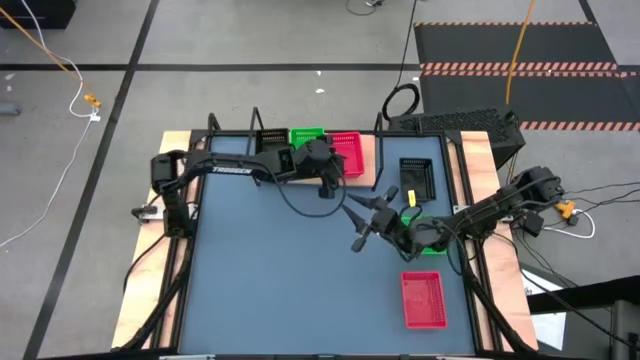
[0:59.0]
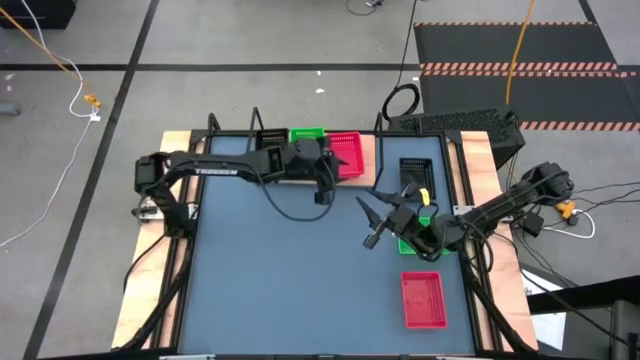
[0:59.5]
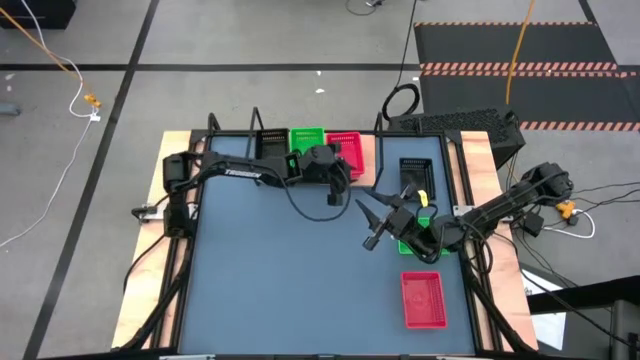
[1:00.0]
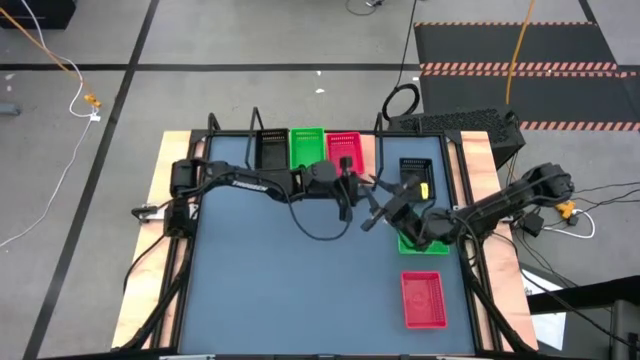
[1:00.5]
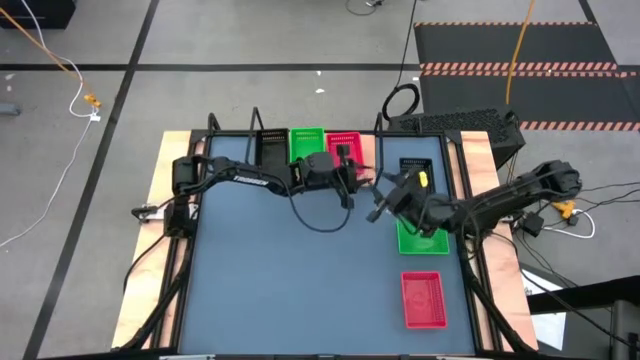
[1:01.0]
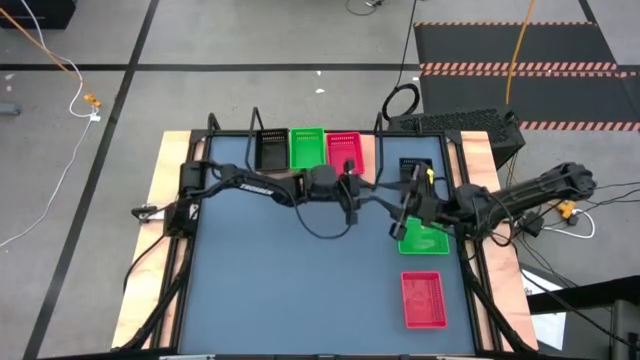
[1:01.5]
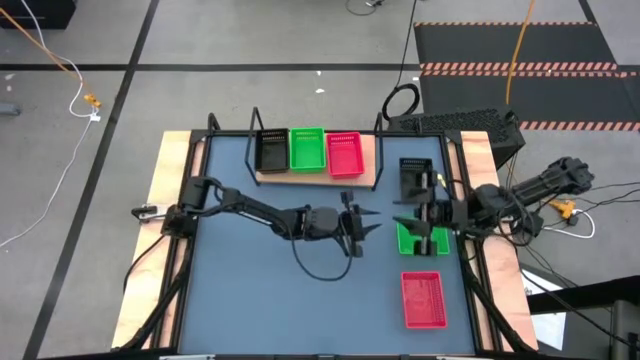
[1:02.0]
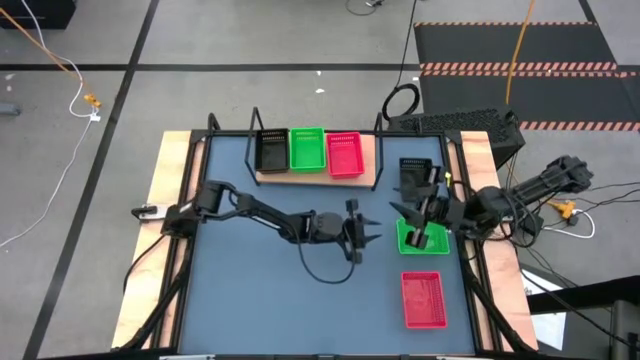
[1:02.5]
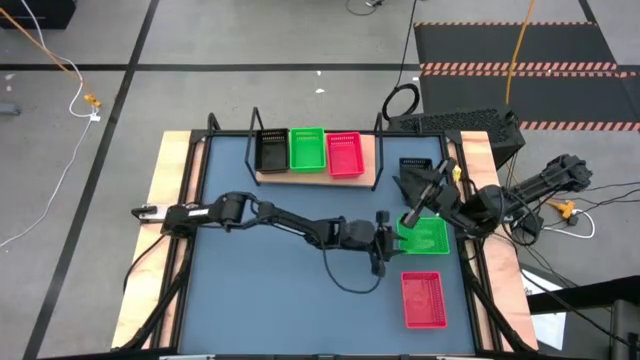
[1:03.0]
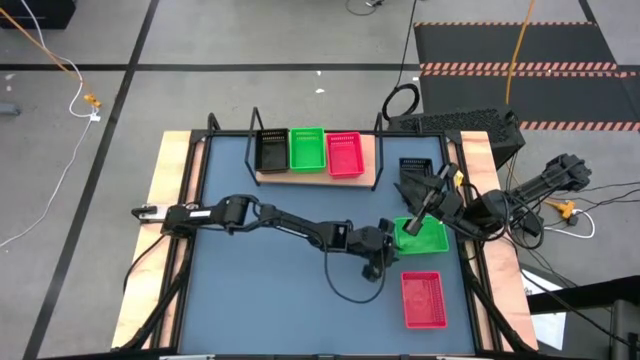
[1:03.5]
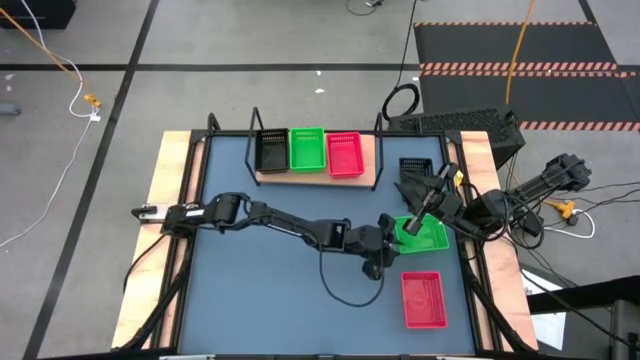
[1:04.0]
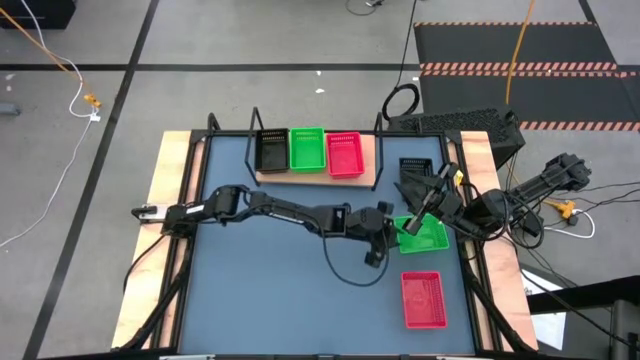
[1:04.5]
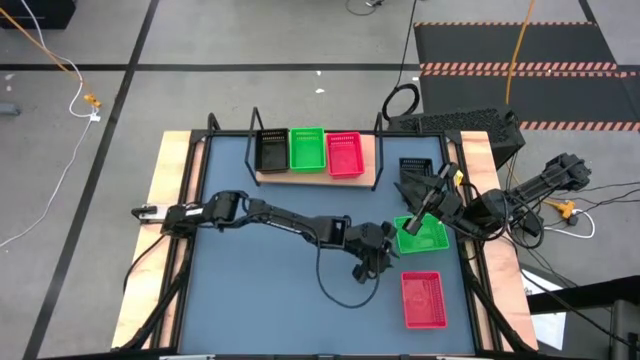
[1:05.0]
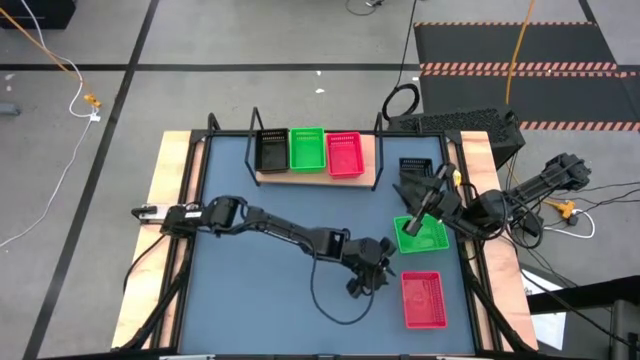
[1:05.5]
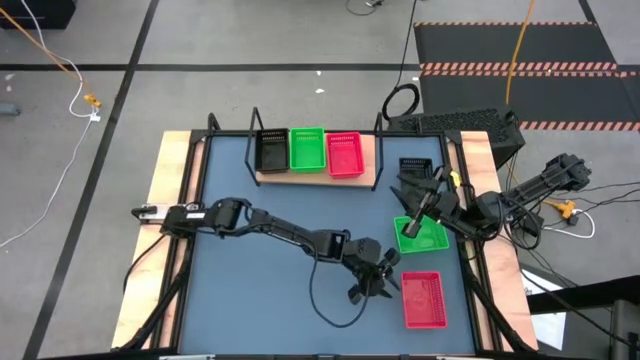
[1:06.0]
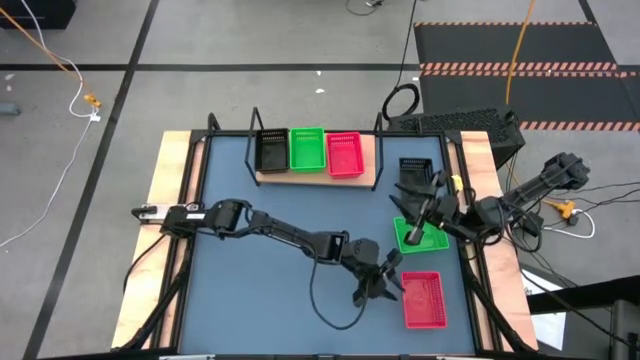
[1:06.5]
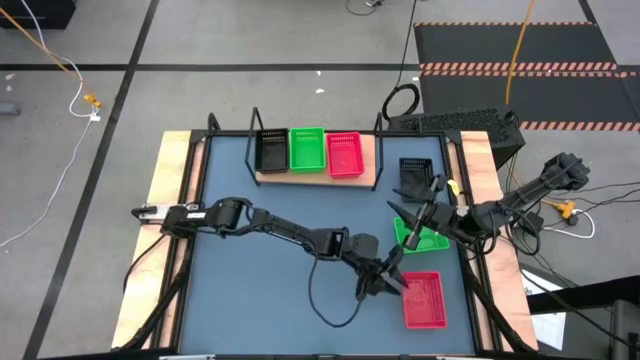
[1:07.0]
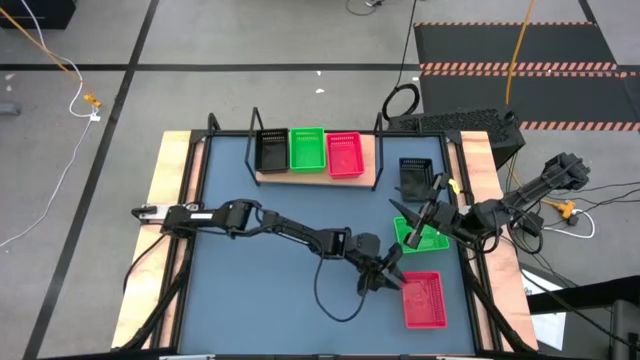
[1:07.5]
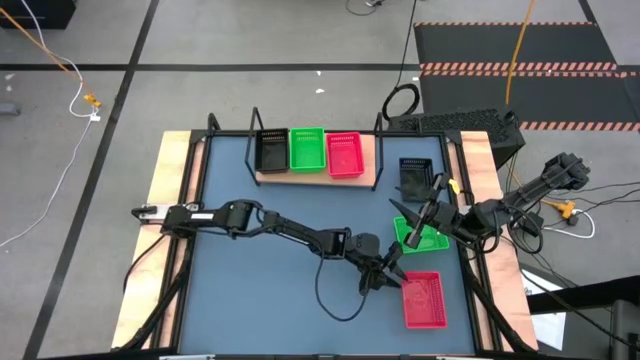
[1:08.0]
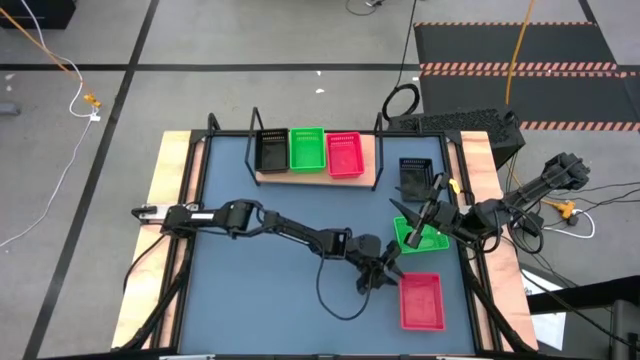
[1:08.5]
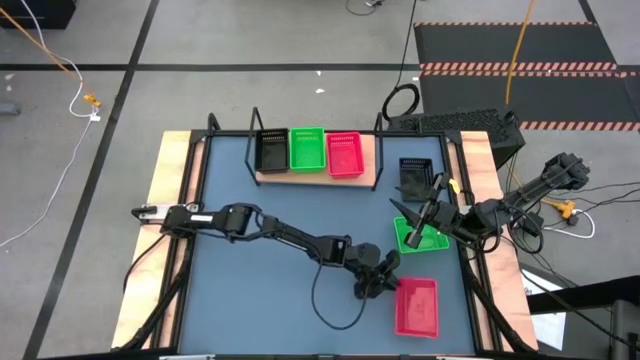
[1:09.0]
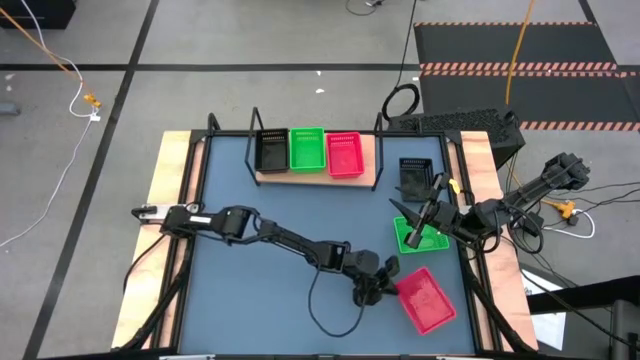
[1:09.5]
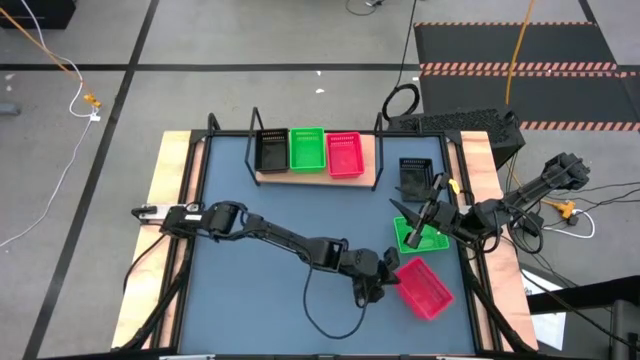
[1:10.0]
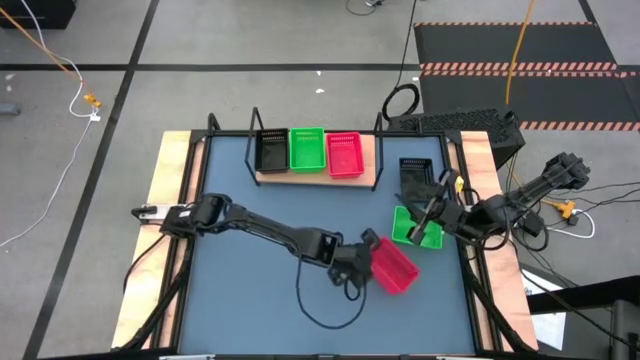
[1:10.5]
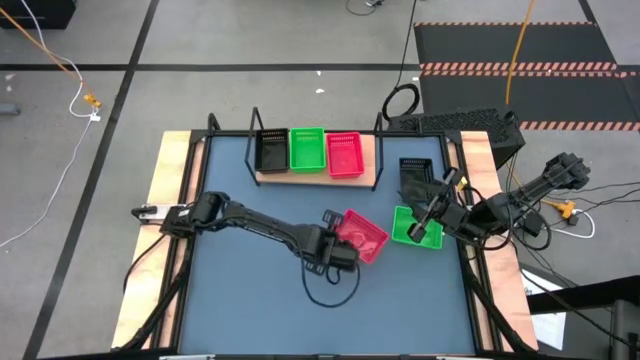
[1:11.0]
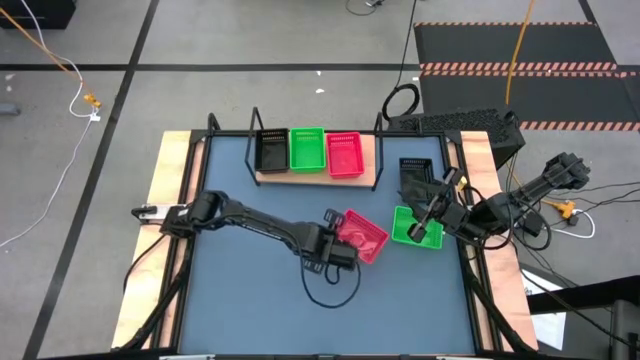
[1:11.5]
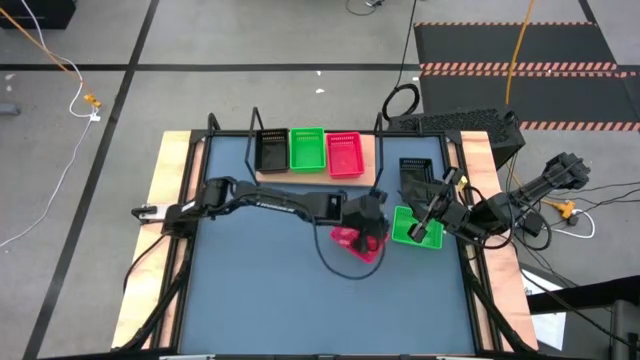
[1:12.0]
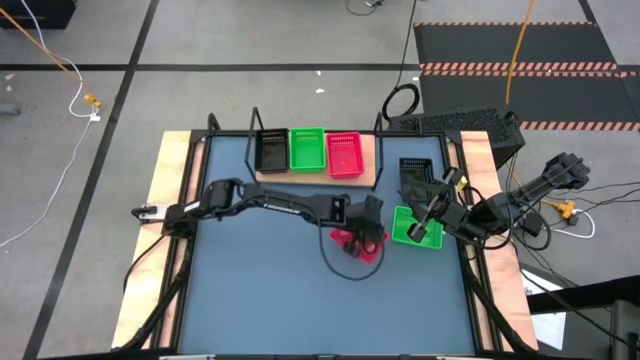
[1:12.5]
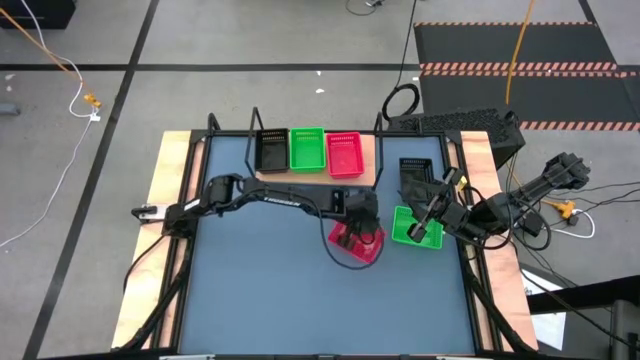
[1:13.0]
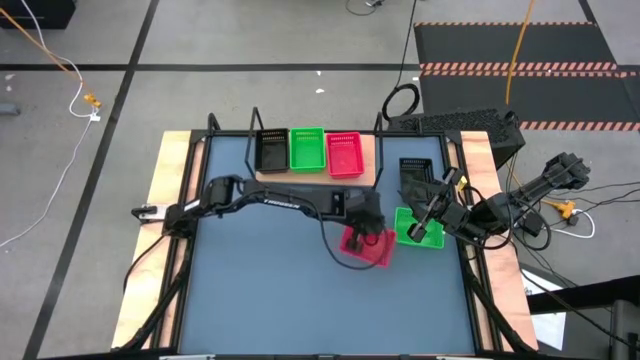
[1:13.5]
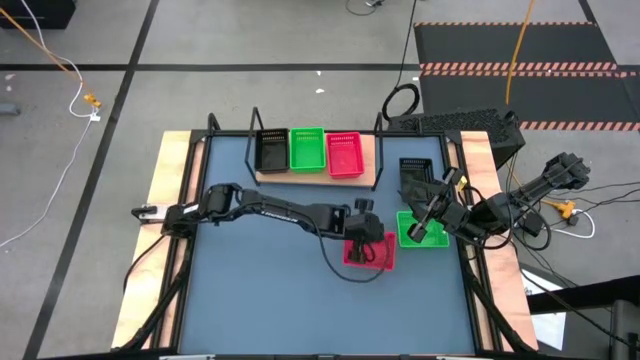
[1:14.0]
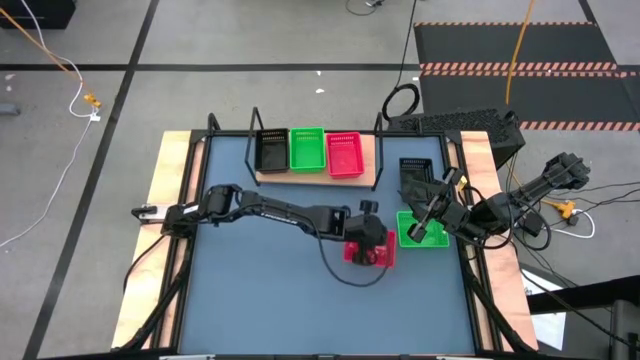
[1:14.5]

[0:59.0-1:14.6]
Task: Stack baskets on shelf by color
Move the red bin to the middle right of the table

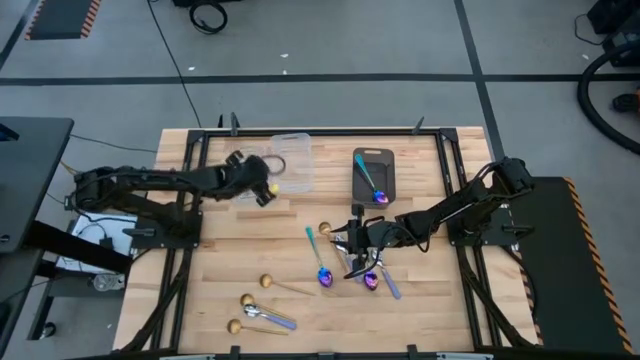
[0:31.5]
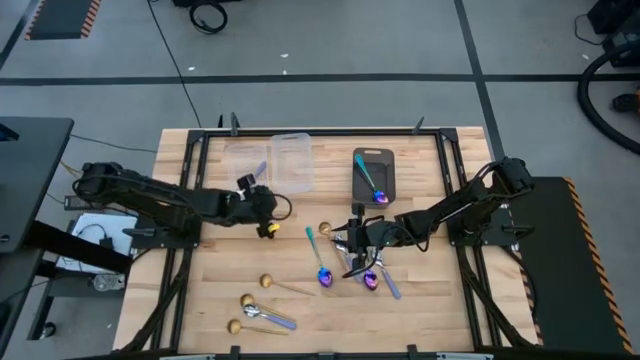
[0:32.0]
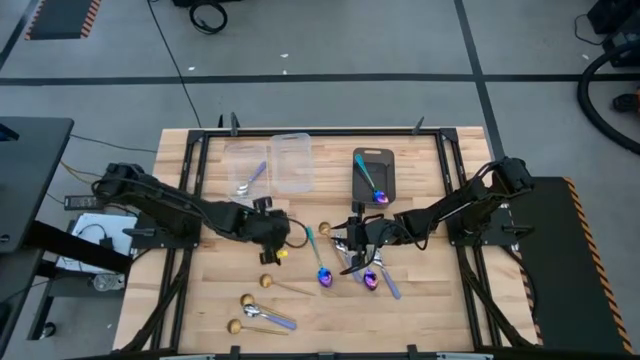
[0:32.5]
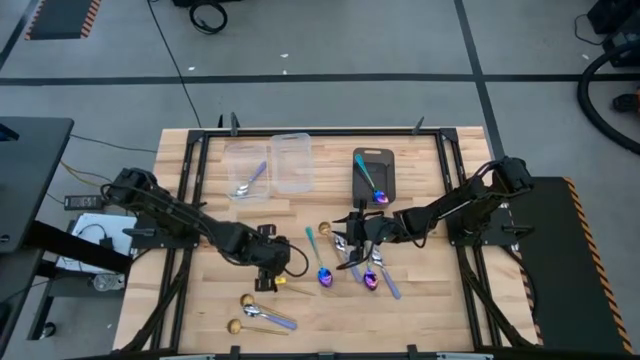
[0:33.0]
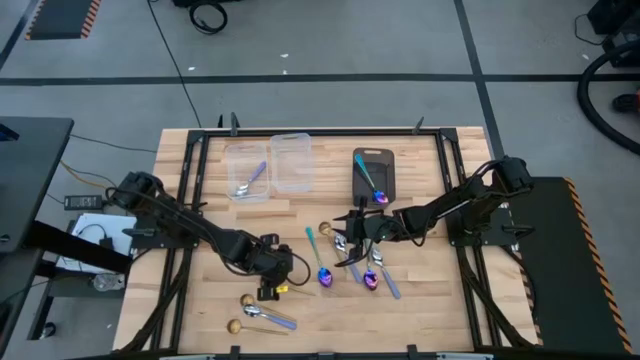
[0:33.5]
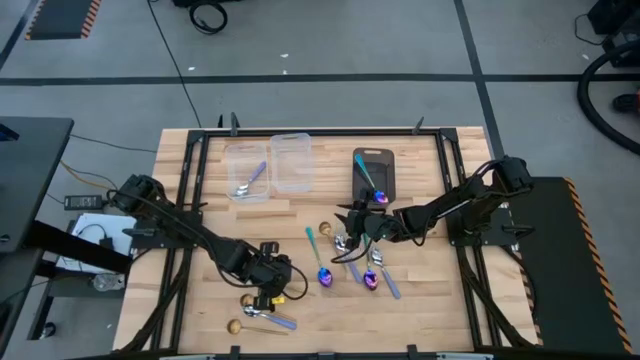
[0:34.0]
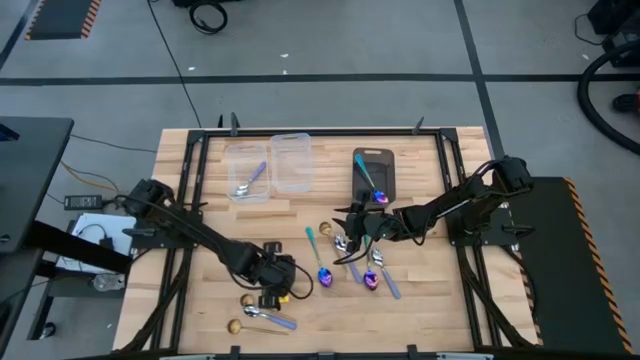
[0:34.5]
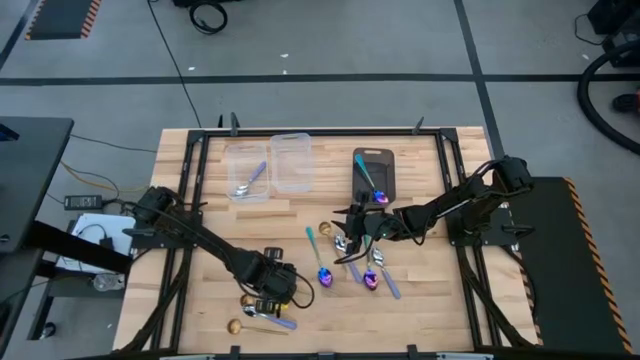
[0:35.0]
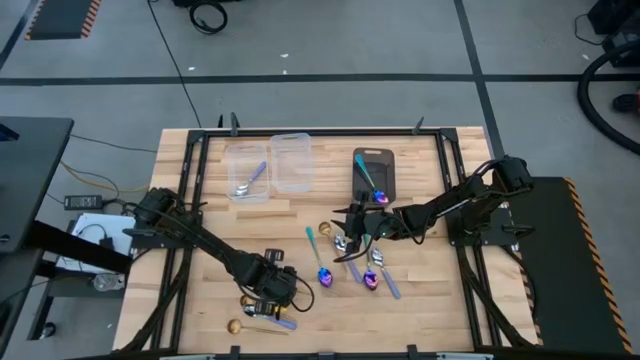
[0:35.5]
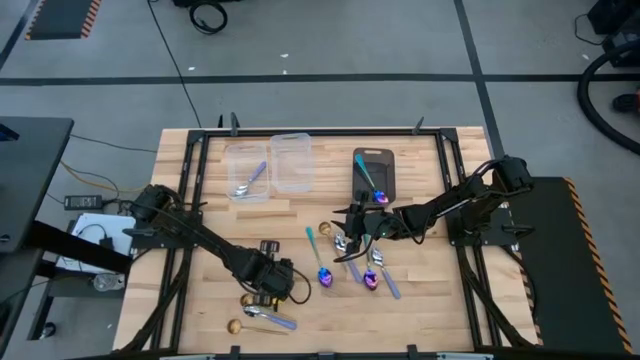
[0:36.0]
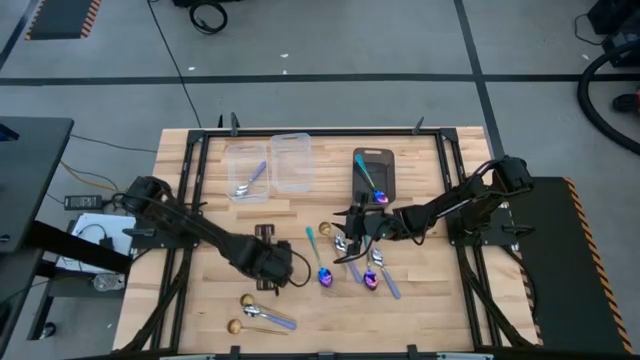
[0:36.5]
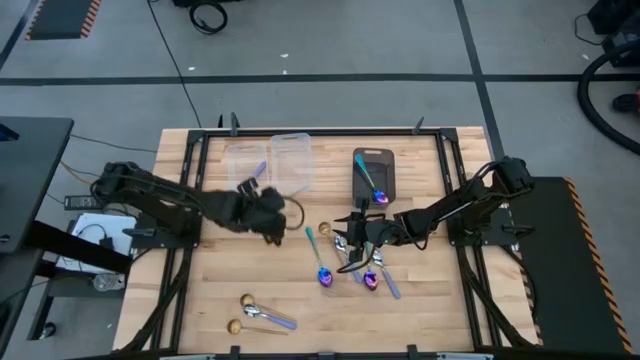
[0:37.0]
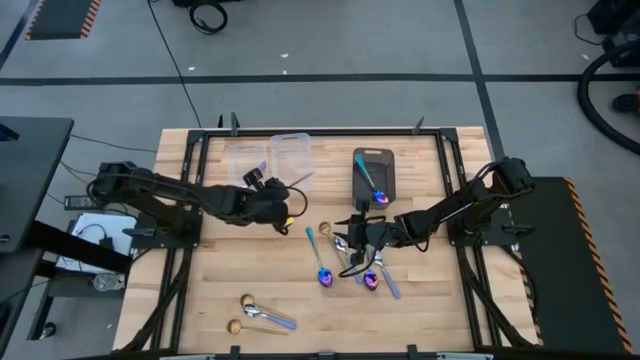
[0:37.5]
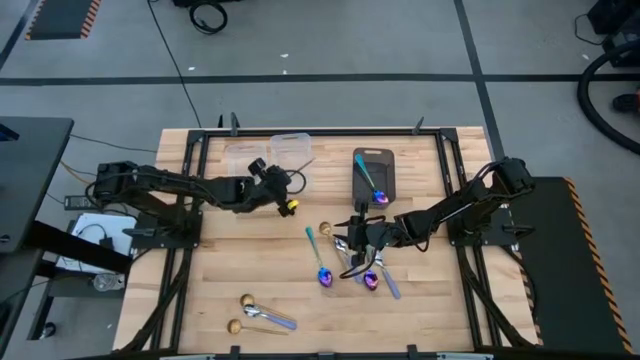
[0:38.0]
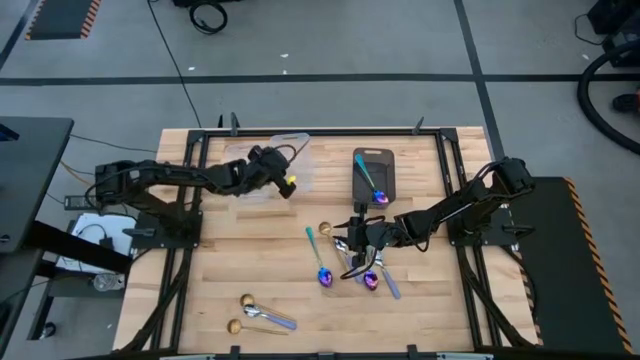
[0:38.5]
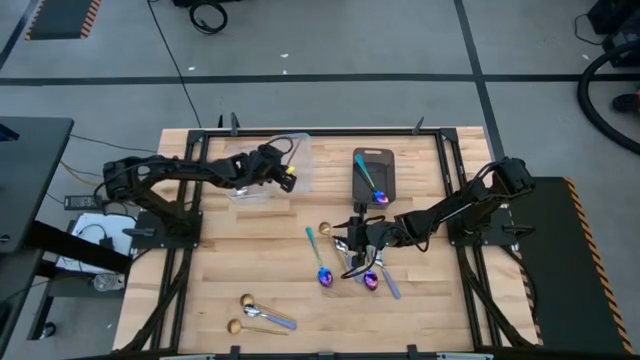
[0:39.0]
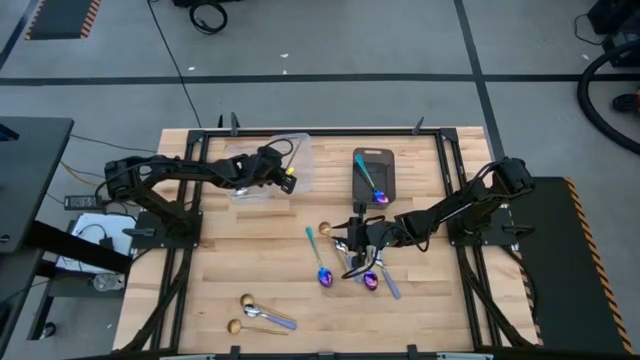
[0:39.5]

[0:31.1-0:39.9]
Task: Sort silverware by color (type)
Put the gold spoon into the right transparent bin
